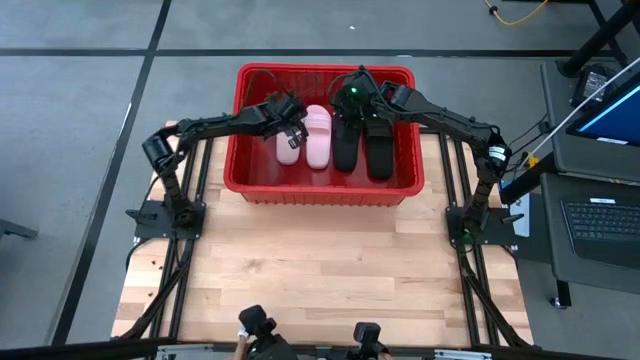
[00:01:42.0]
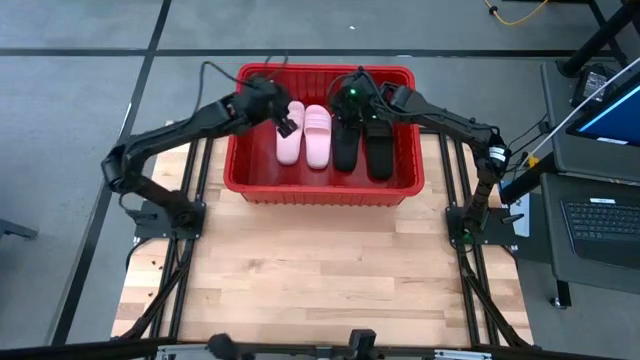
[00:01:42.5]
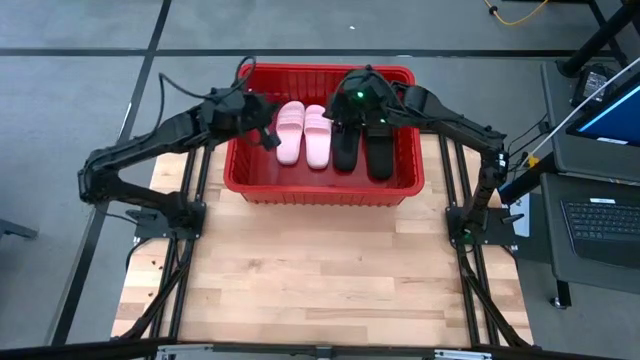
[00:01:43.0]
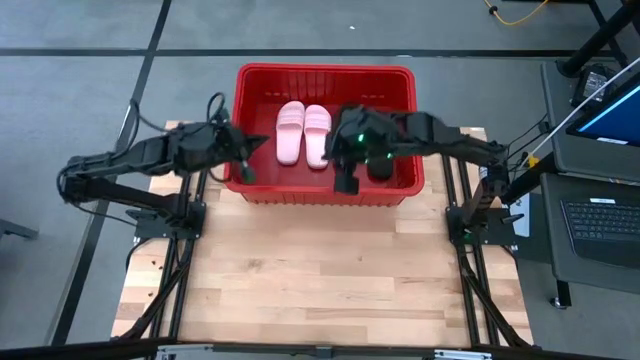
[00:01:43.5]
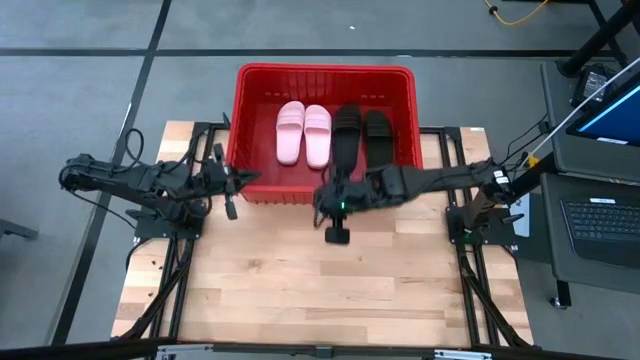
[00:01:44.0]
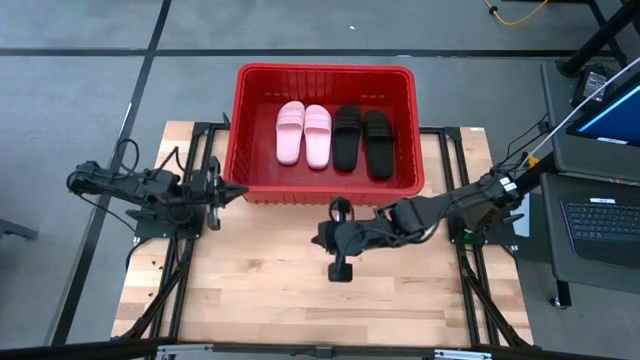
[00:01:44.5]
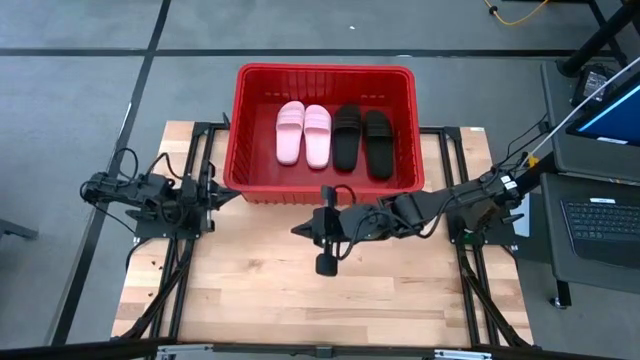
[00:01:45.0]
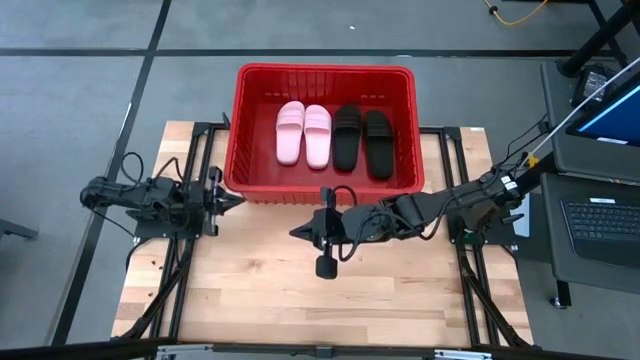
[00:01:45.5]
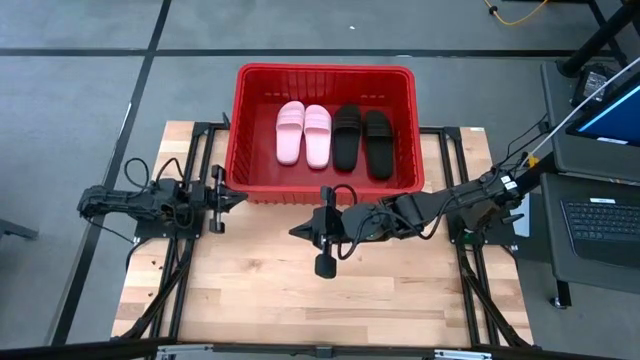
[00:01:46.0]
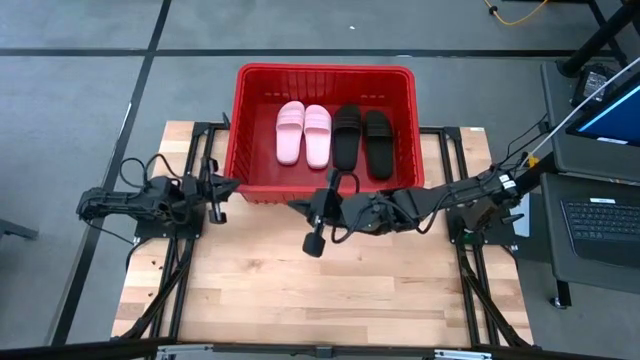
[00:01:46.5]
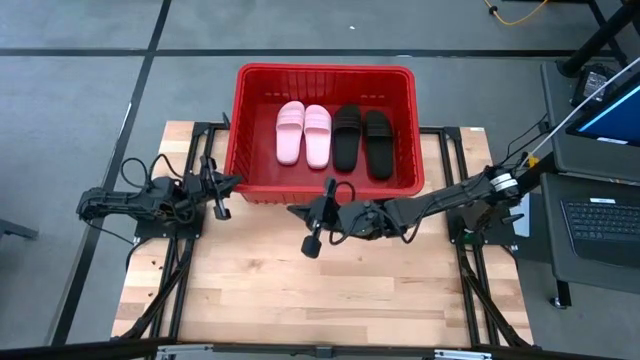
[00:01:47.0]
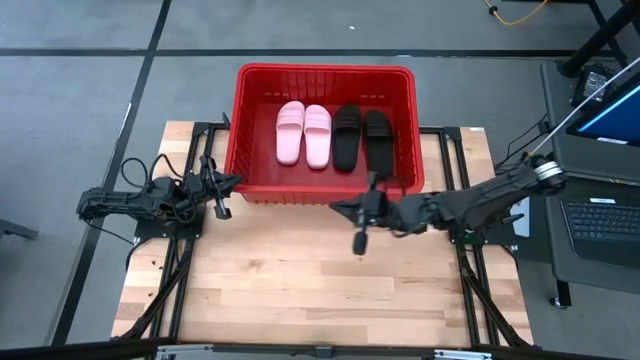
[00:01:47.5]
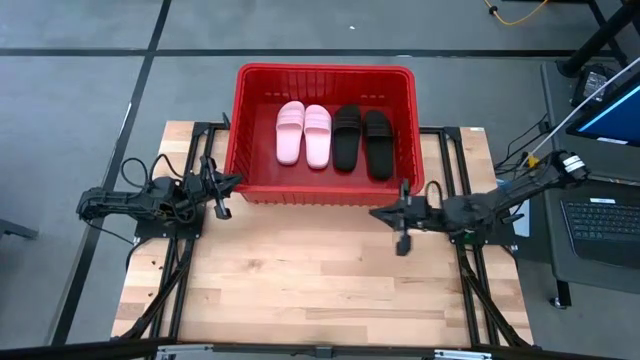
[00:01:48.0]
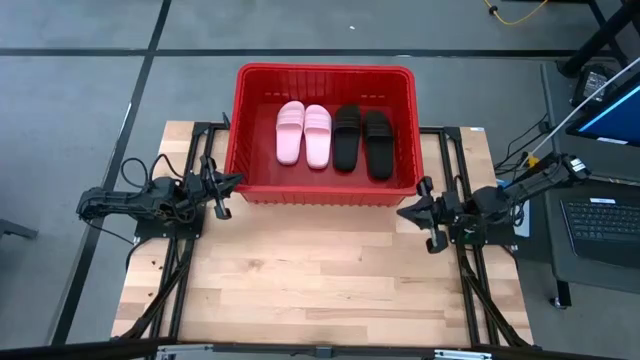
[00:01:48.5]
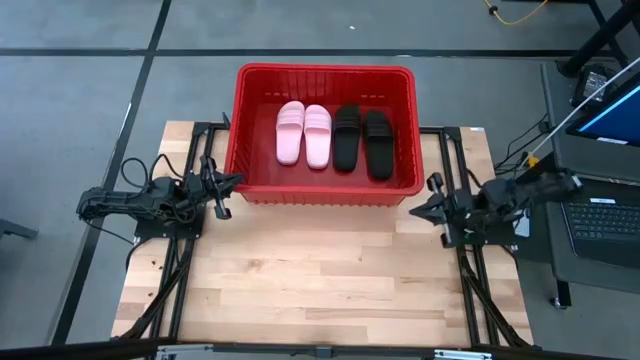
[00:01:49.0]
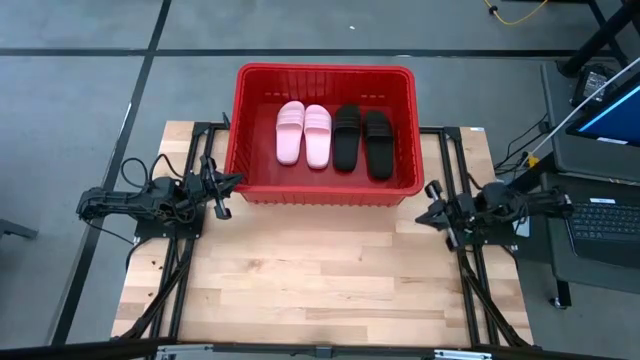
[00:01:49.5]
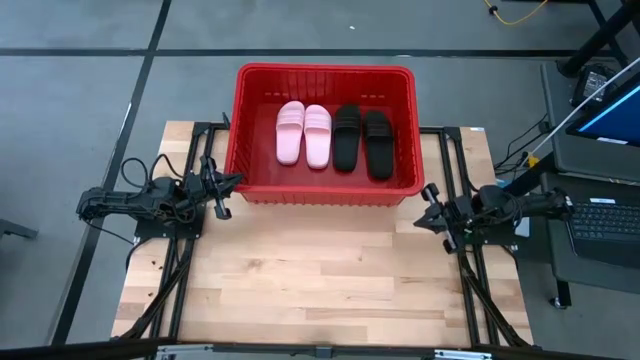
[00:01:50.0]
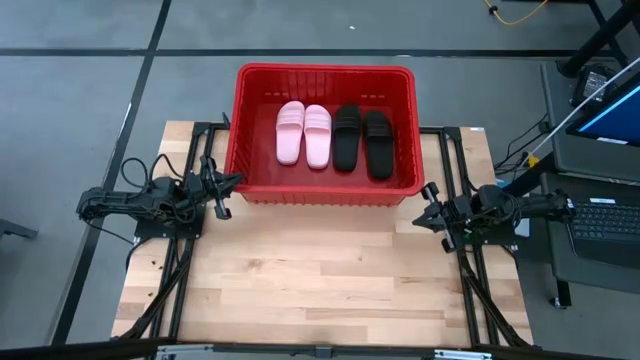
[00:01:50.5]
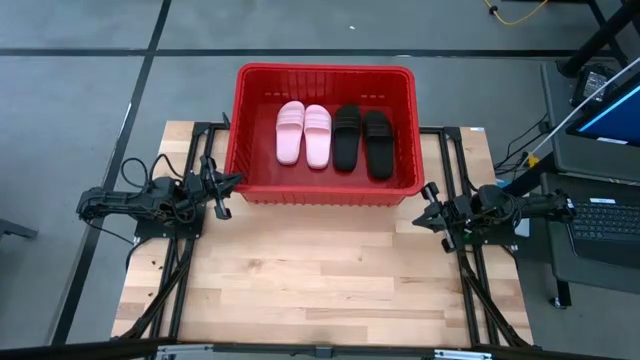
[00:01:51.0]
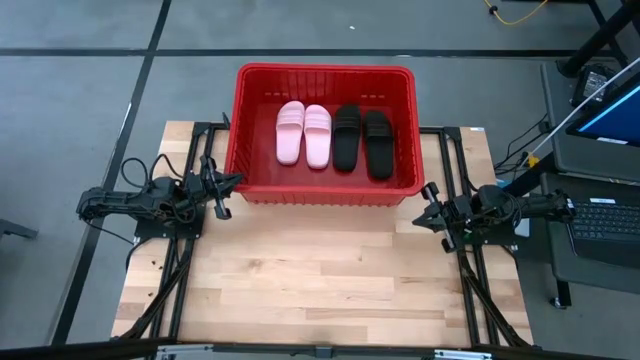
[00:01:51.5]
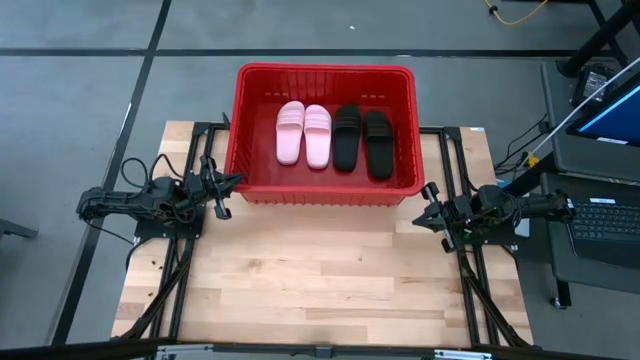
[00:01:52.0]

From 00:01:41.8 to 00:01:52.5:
Task: Pick and place slides into bin
Return to Home Position

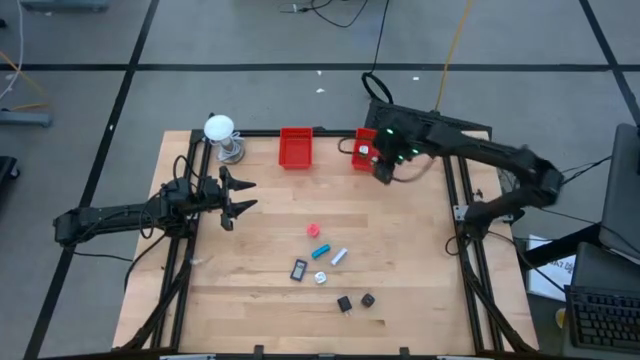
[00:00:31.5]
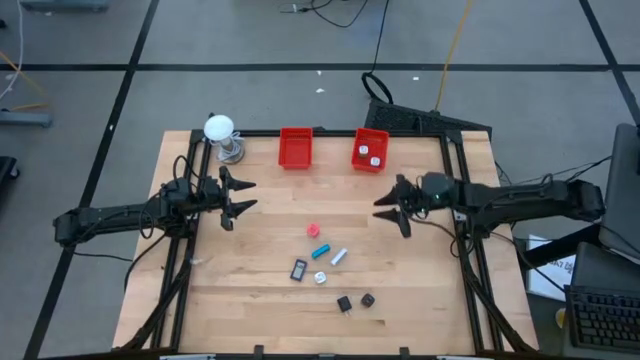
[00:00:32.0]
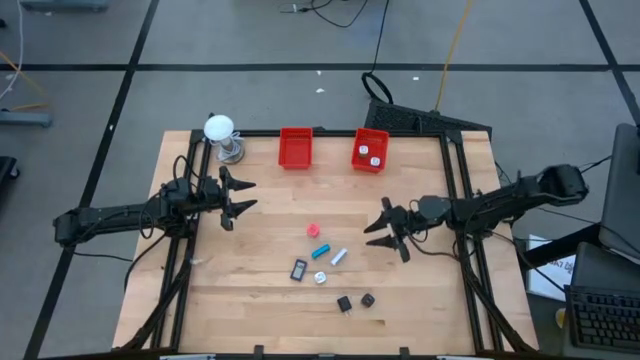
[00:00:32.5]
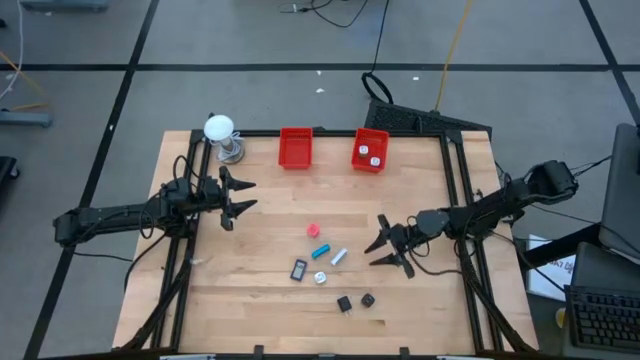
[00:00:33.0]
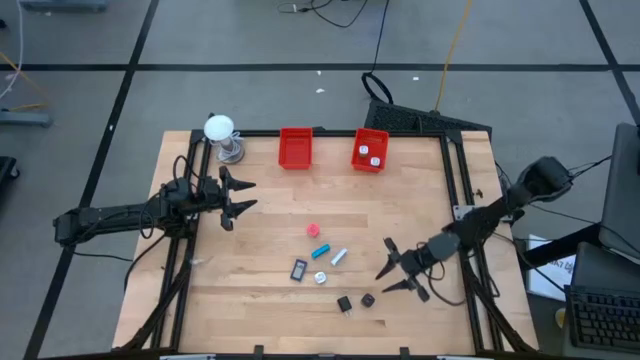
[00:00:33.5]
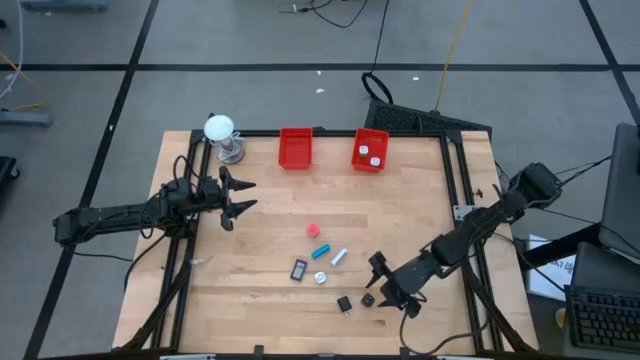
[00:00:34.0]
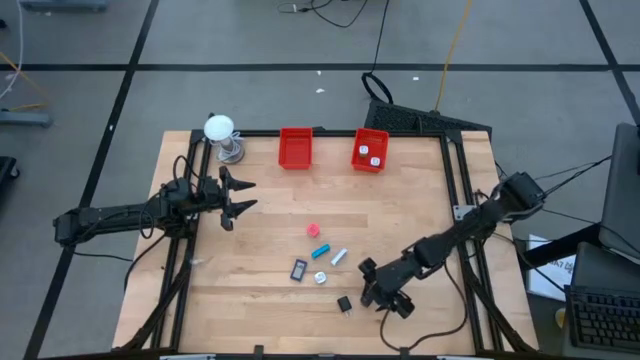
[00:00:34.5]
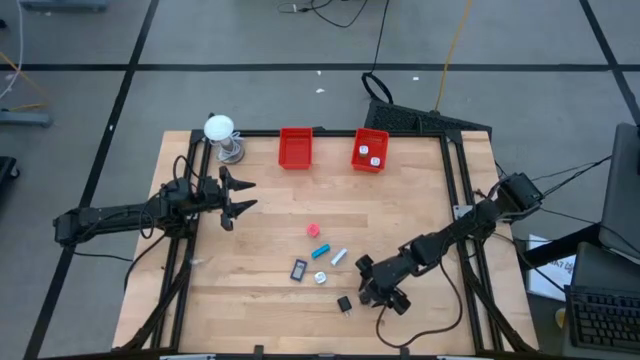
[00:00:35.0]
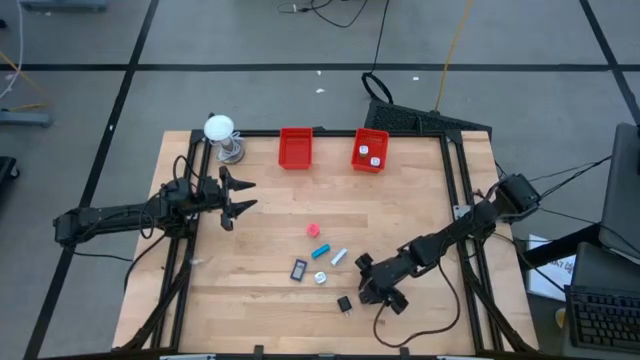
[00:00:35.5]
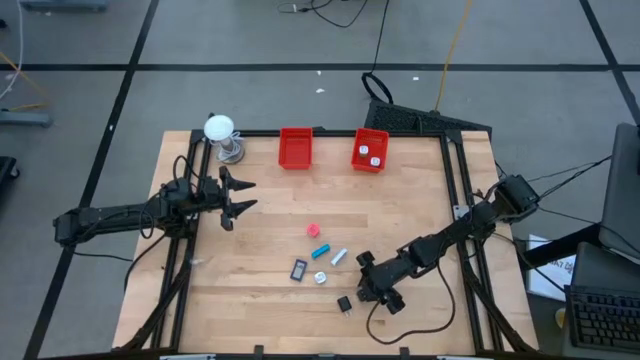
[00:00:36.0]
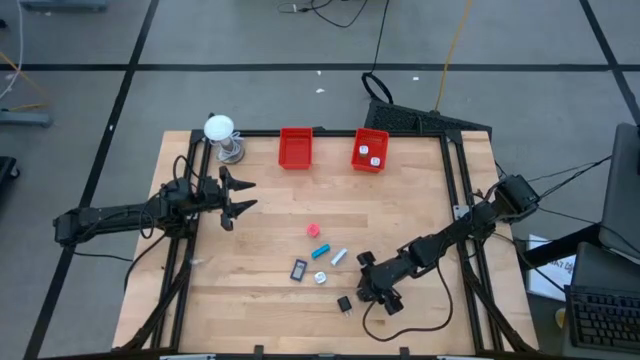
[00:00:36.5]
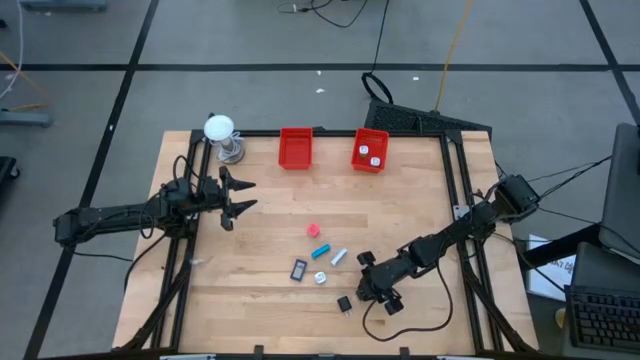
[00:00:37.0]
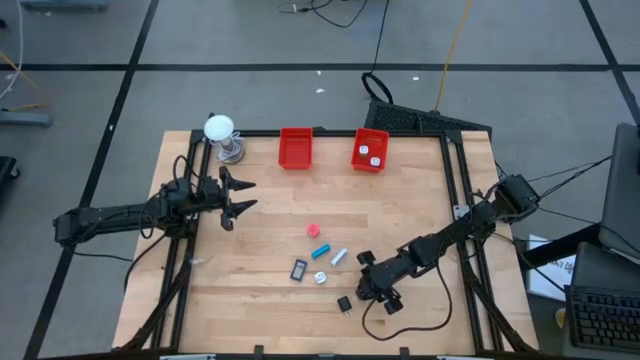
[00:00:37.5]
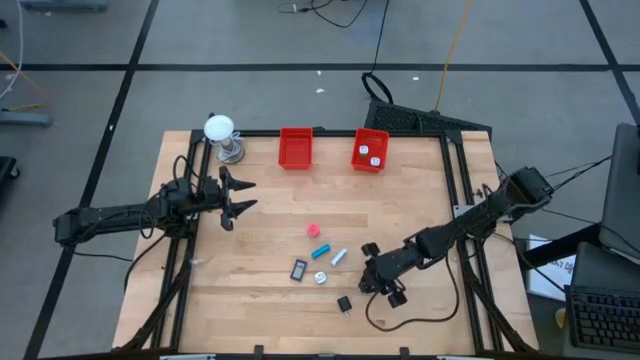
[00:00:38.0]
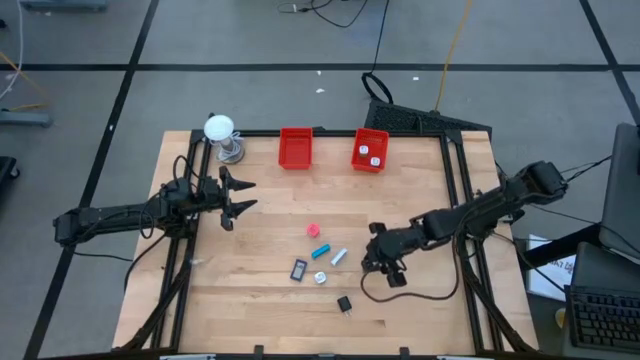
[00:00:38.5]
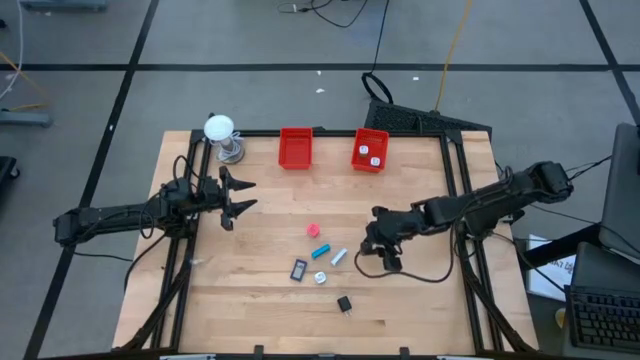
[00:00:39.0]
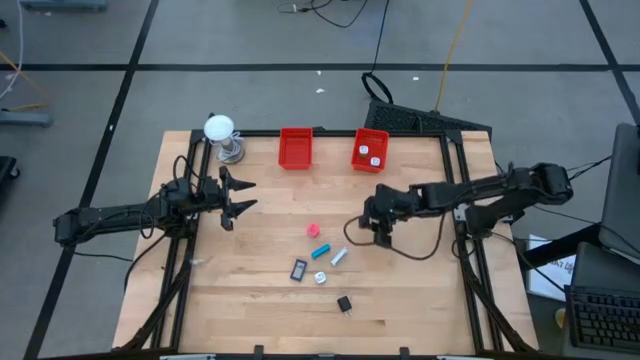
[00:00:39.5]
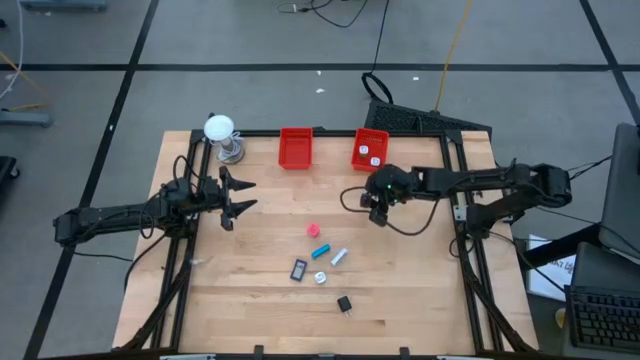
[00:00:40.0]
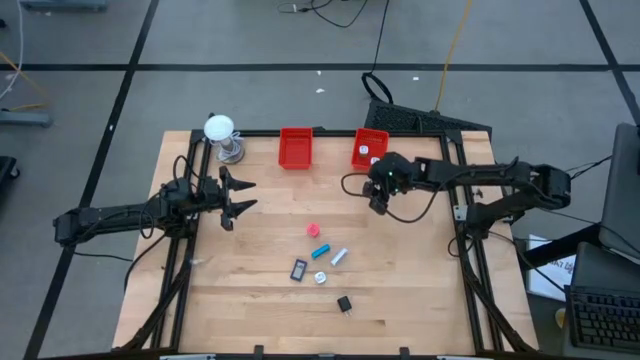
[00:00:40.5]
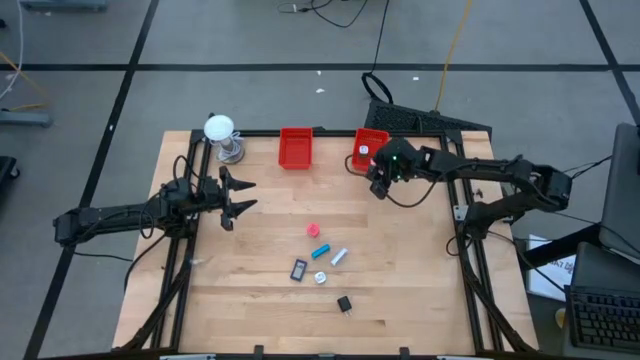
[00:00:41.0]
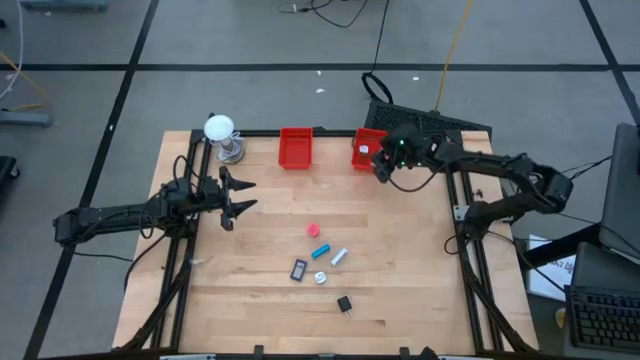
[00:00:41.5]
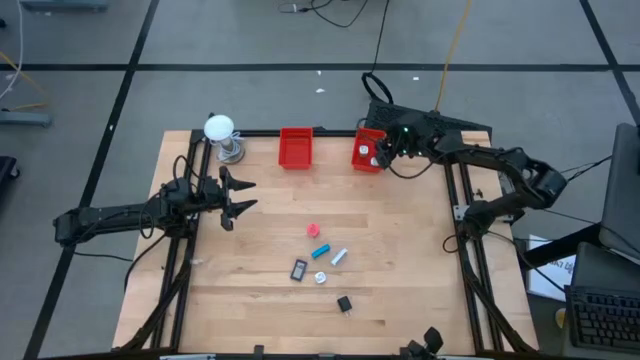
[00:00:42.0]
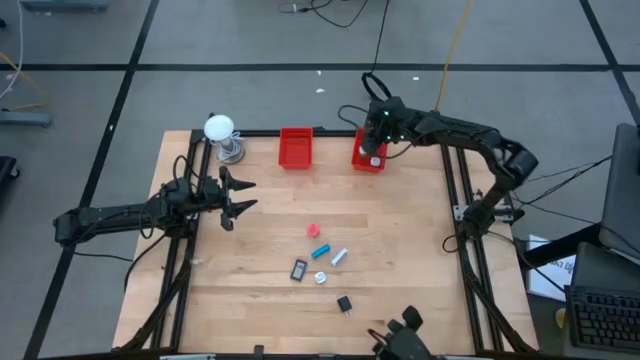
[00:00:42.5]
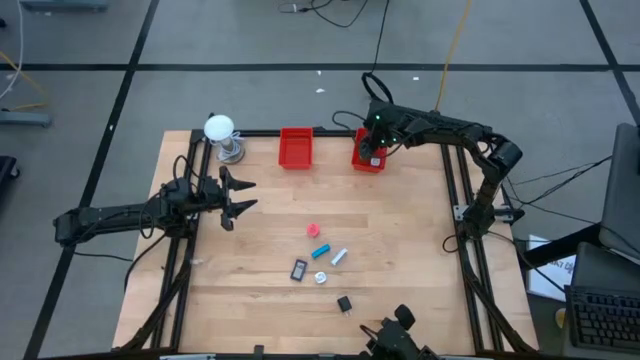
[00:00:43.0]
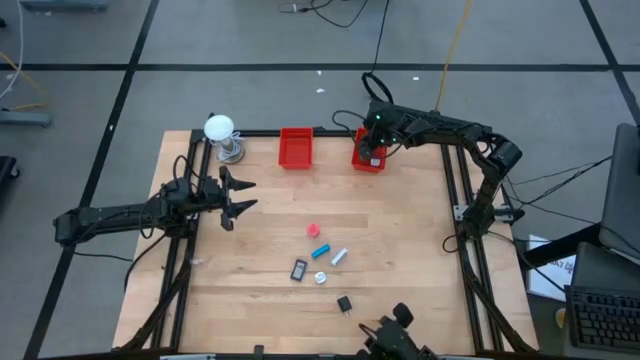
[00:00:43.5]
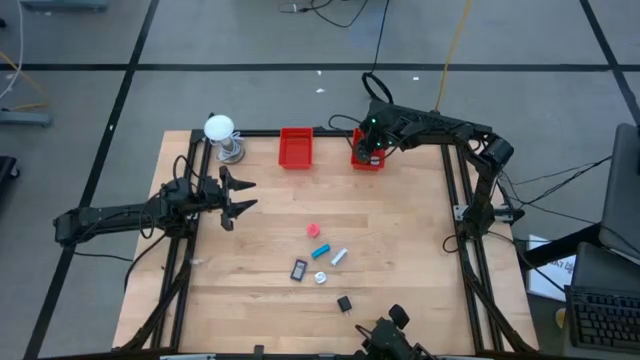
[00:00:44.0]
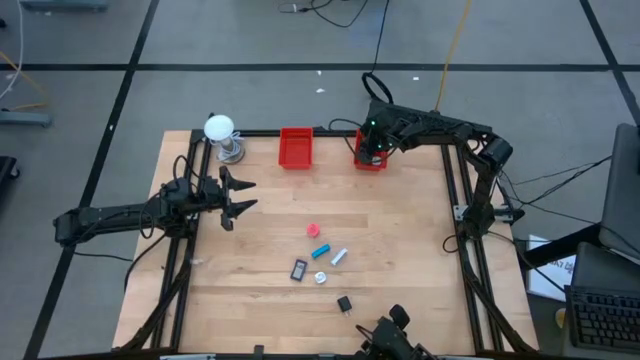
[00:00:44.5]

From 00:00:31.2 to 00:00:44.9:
Task: Pick & Place Office items
Put the right black charger adapter into the right red basket
